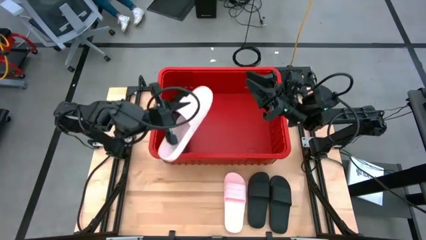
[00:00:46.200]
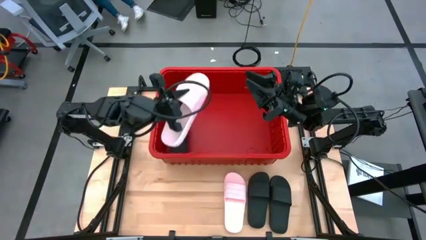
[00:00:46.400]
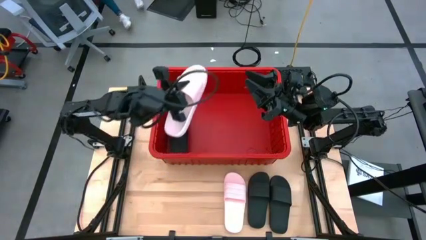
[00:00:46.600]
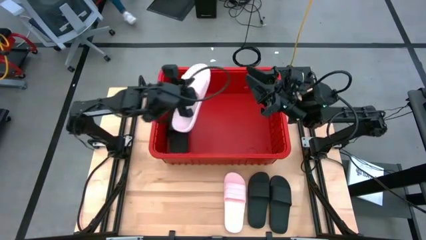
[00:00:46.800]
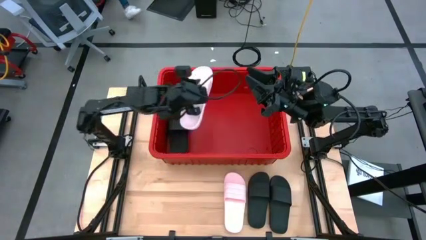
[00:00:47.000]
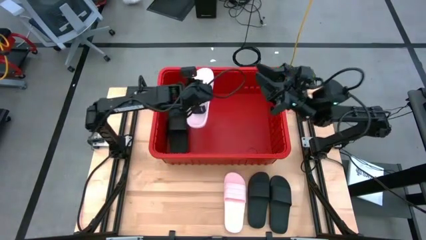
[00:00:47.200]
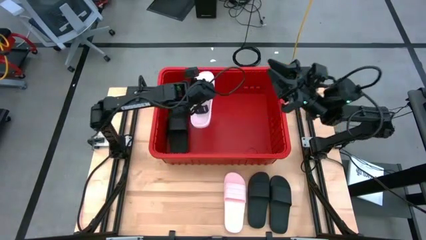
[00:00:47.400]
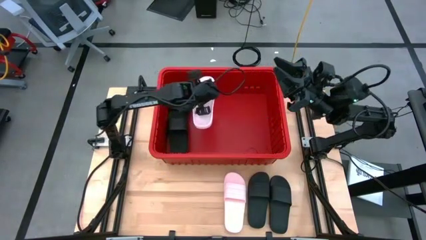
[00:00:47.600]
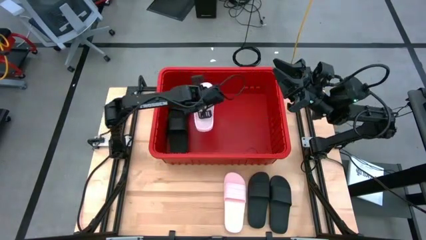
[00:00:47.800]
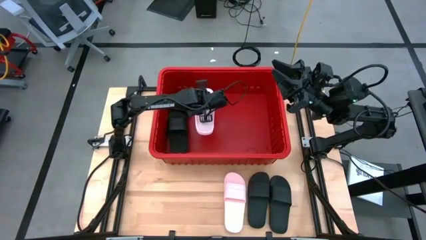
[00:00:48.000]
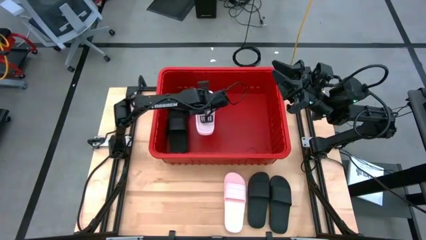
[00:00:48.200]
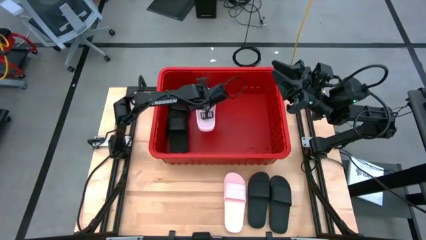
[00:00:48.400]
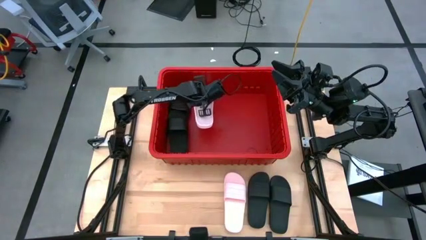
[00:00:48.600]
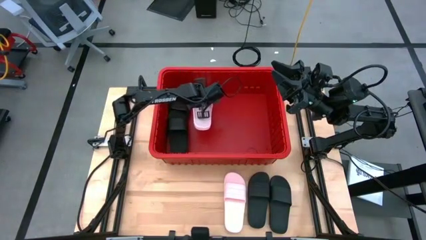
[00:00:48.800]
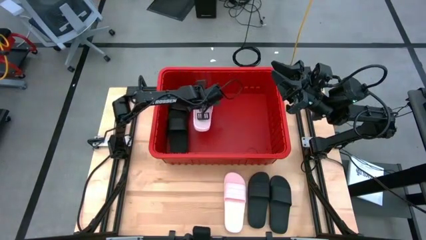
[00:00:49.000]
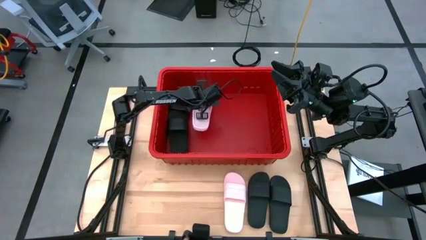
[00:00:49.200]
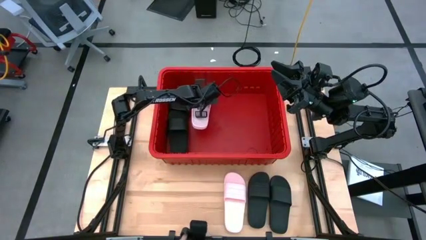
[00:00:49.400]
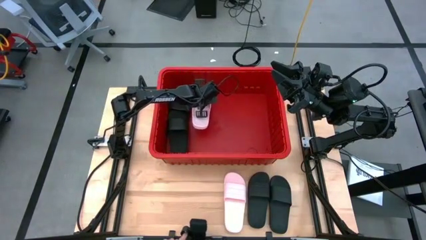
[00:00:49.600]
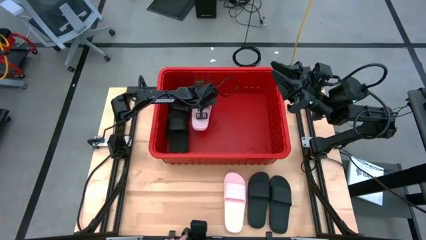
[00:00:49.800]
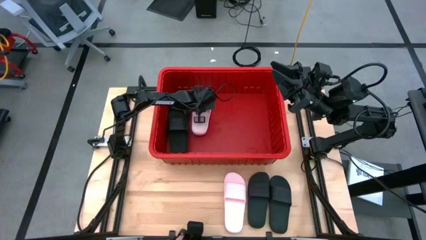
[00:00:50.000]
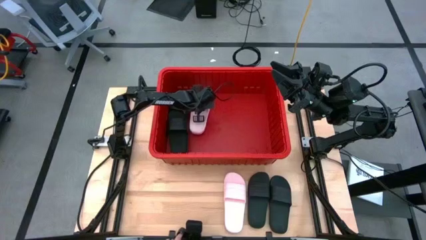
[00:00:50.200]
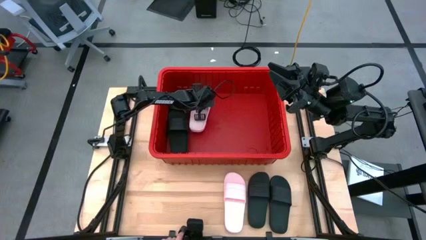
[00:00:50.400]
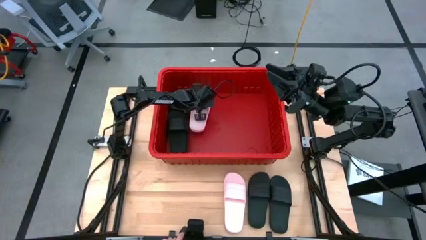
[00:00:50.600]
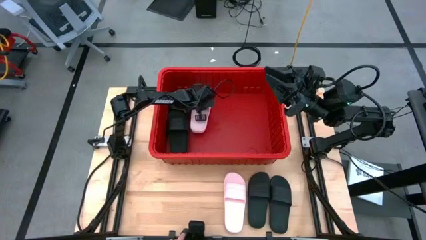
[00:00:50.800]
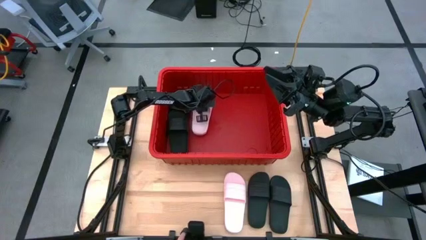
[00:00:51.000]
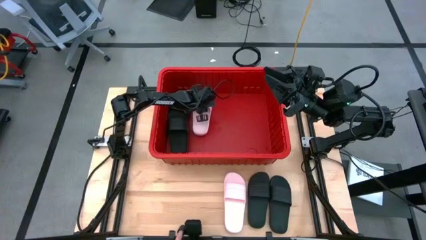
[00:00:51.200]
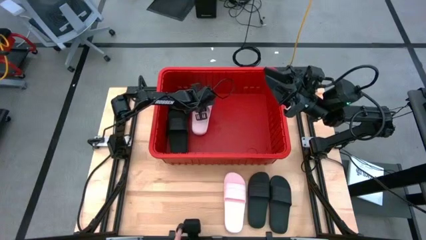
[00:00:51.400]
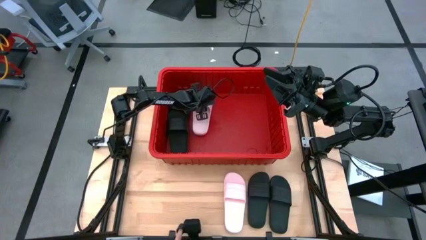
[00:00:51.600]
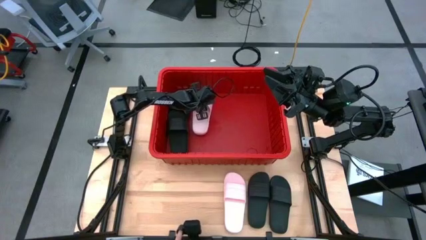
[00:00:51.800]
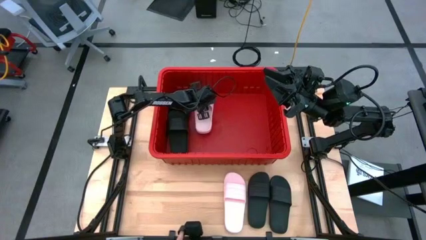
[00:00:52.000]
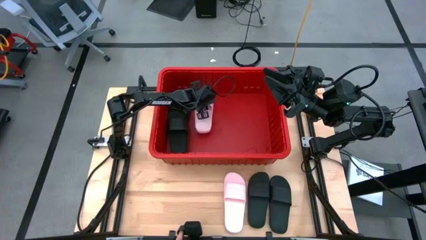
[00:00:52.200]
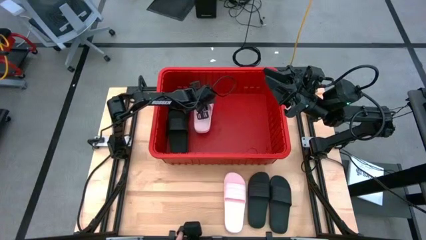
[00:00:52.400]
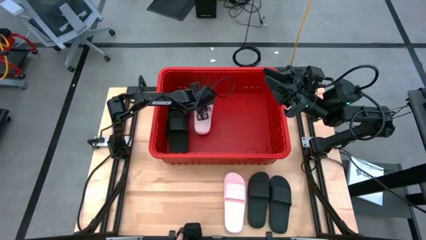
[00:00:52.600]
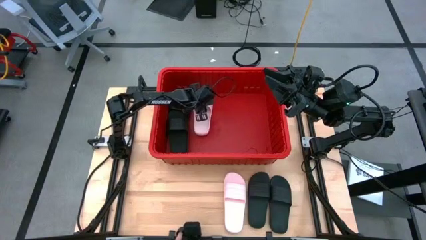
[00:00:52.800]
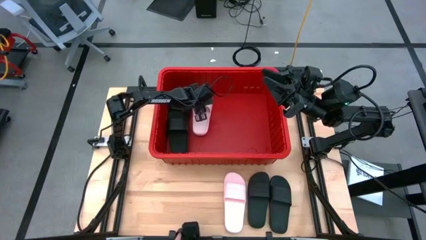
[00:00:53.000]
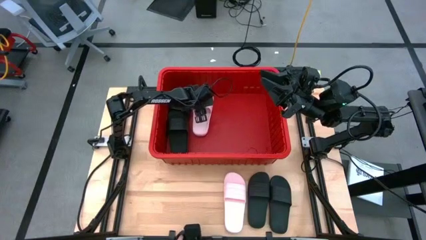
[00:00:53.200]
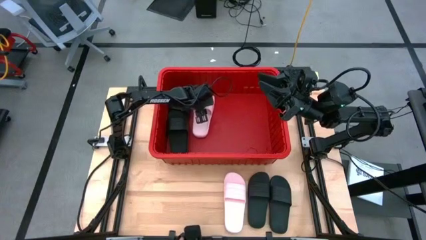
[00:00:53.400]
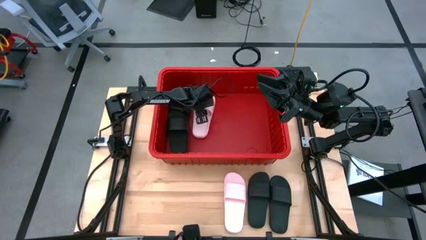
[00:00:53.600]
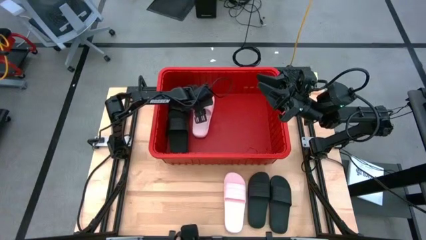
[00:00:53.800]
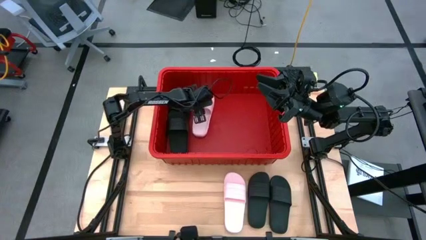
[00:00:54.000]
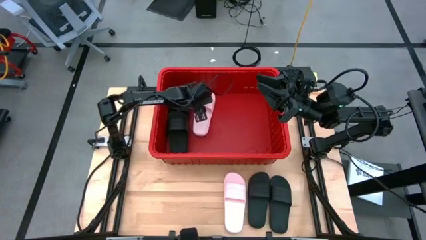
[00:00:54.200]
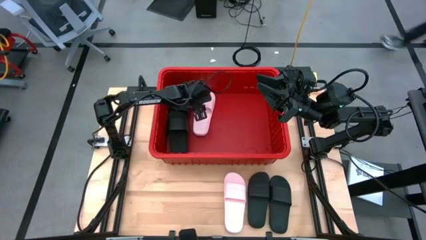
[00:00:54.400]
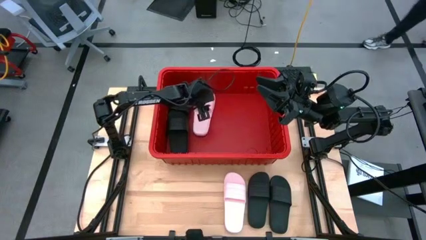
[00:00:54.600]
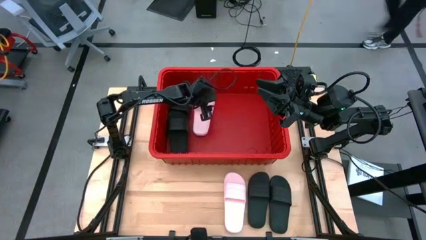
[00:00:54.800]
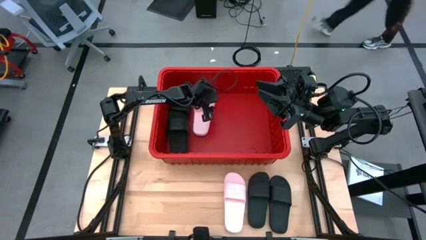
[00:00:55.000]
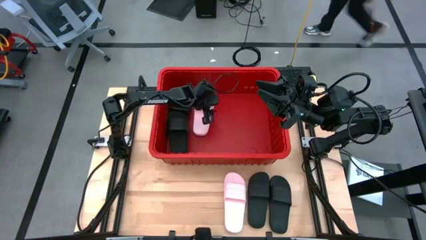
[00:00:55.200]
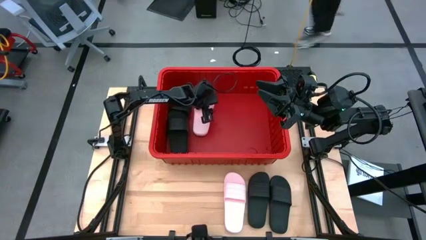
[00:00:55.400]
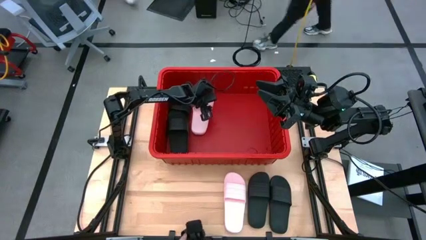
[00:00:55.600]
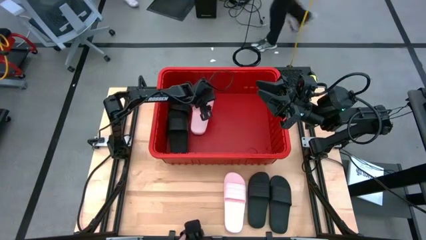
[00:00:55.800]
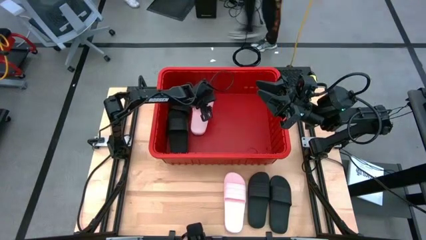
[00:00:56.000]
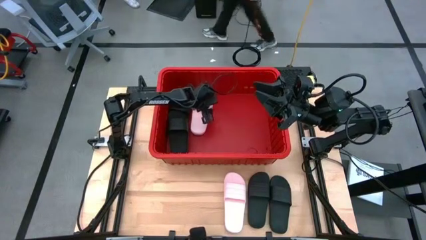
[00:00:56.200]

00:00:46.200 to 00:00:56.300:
Task: Pick and place slides into bin
Put the left pink slide into the bin
